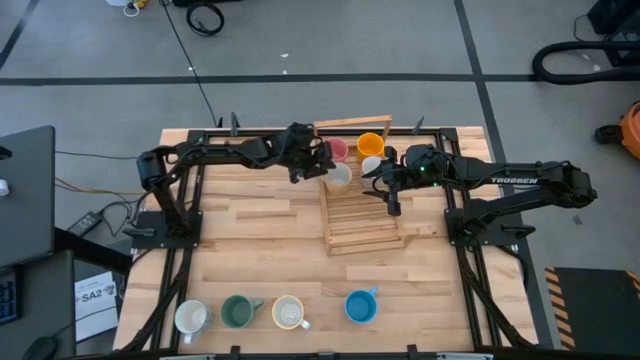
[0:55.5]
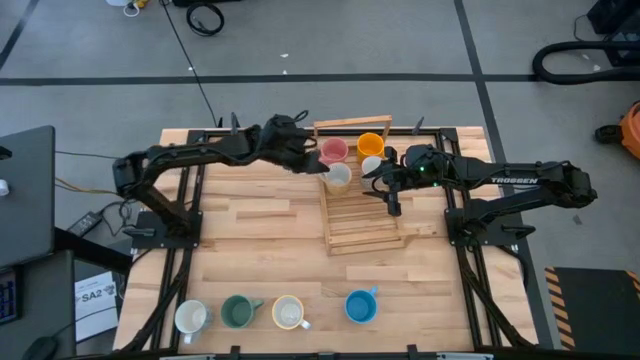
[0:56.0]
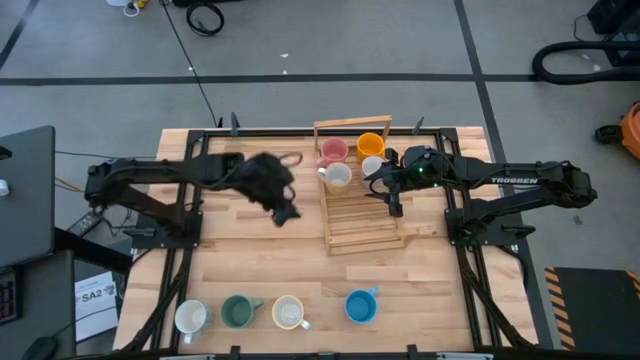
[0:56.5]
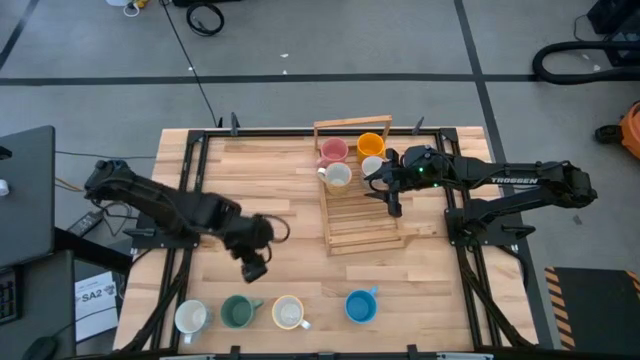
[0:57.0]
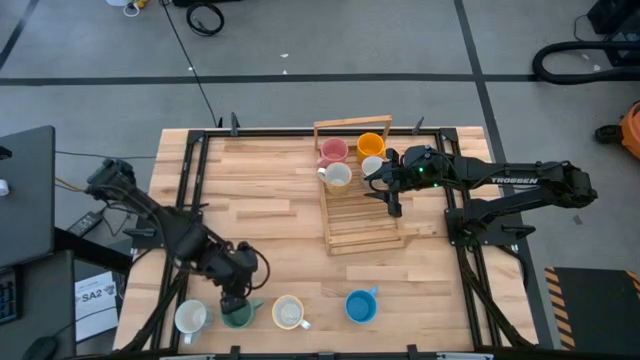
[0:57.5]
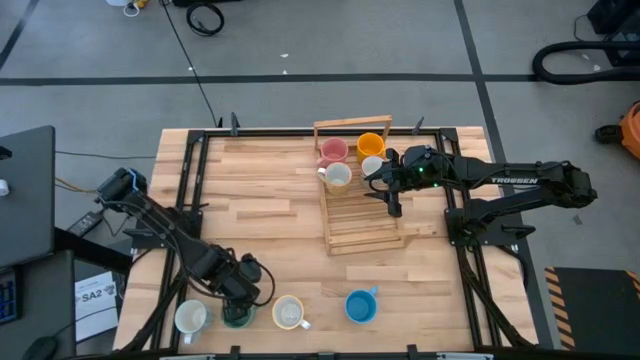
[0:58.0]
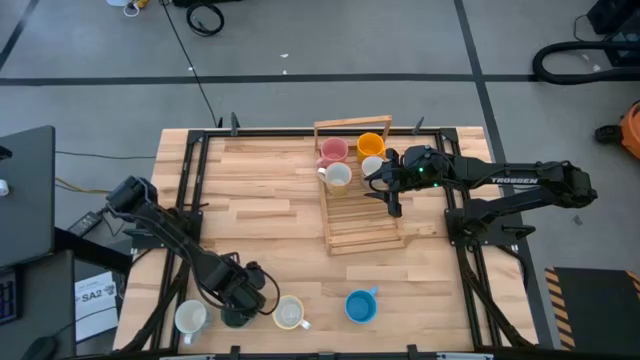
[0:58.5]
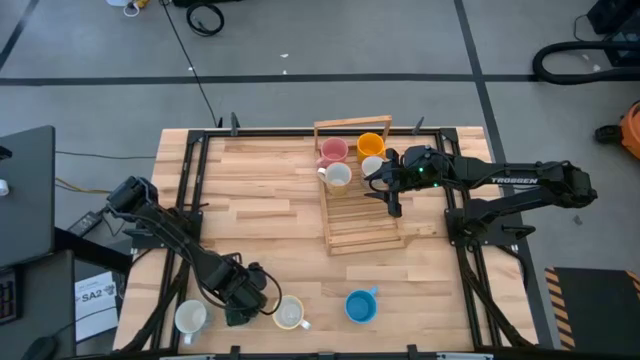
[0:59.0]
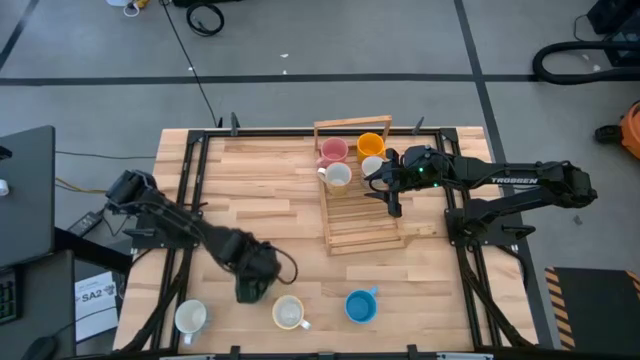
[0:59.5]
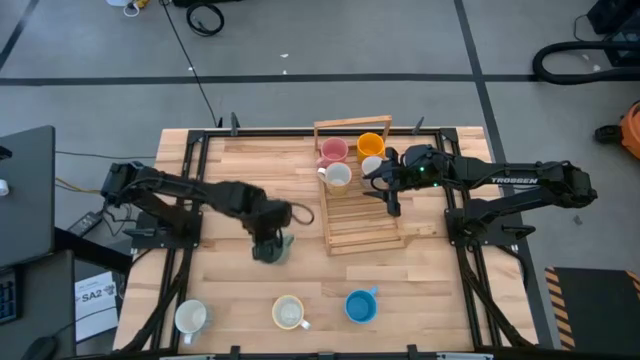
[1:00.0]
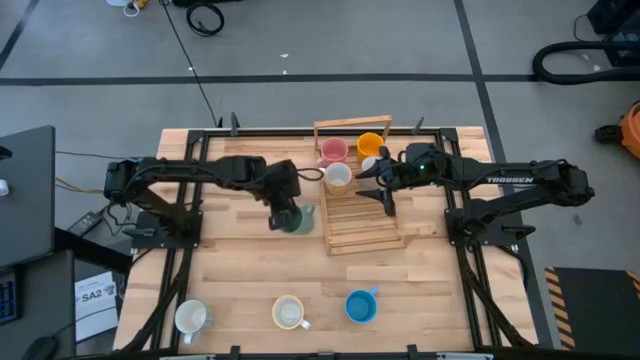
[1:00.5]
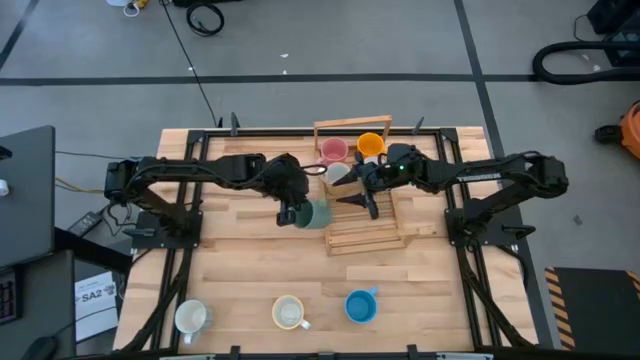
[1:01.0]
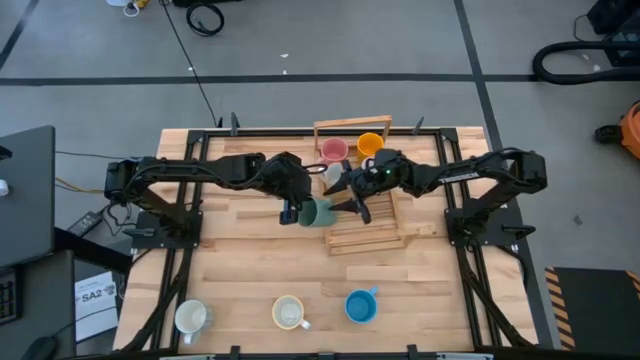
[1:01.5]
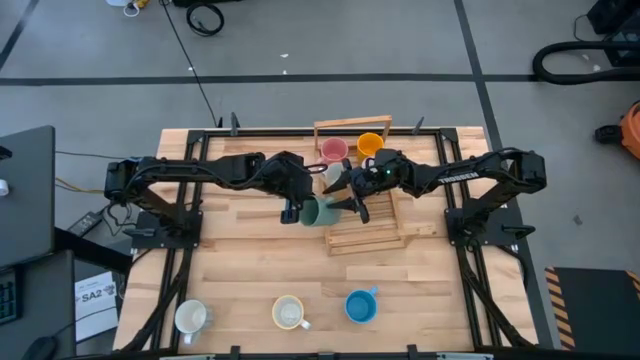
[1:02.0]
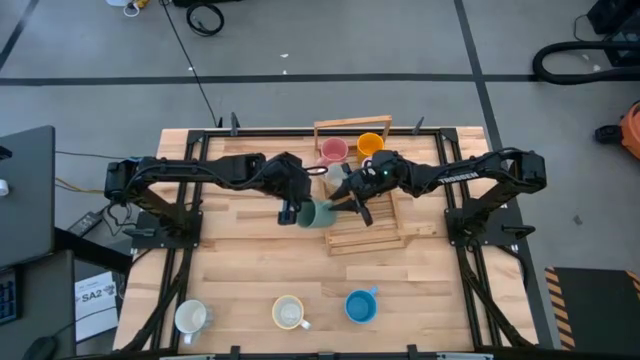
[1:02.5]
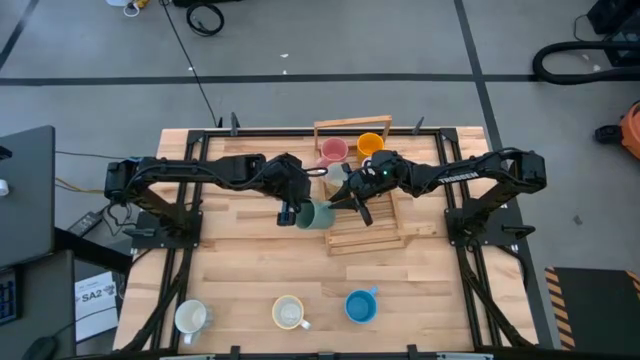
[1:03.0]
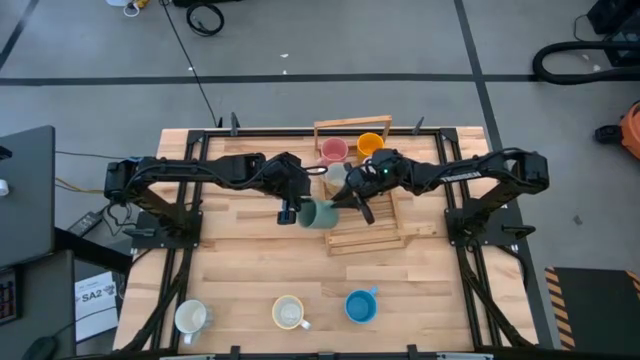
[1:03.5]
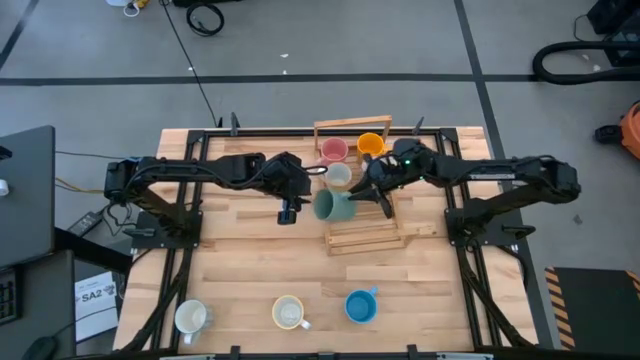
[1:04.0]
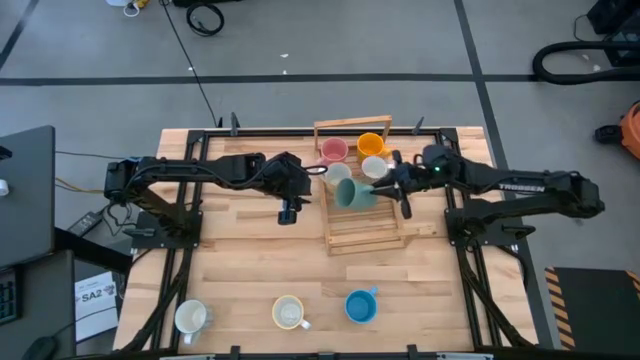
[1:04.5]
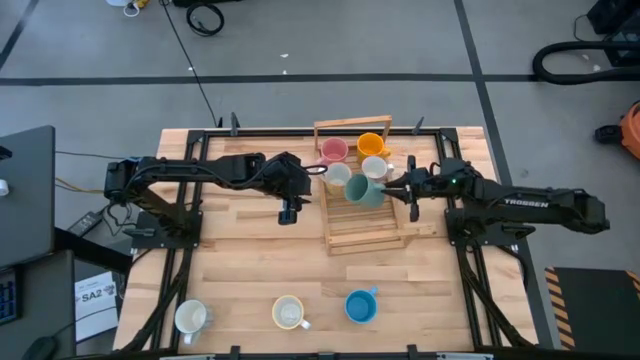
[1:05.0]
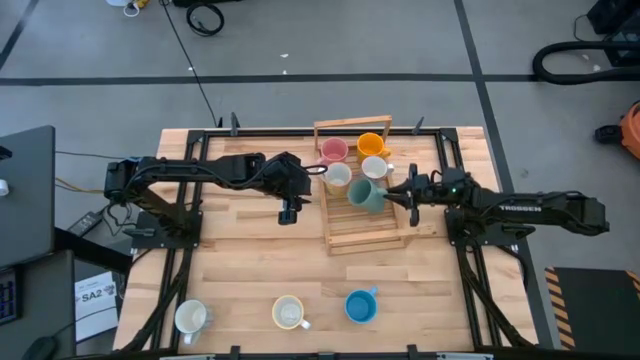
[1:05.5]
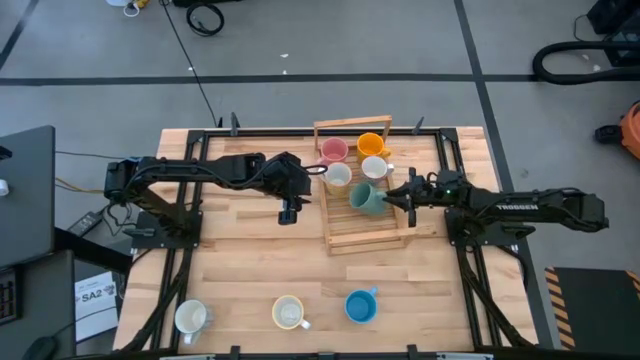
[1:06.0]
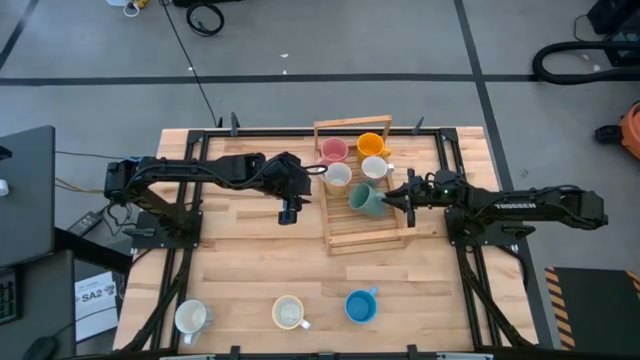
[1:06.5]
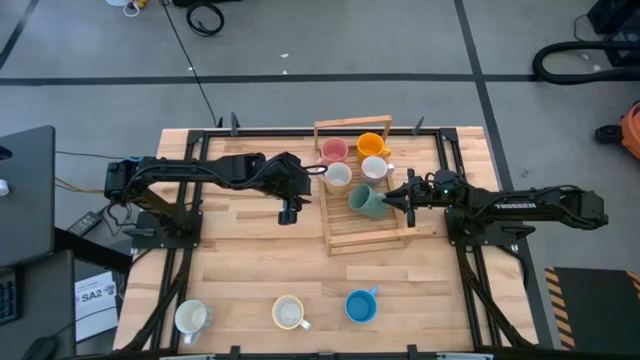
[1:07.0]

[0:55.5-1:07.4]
Task: Place coffee mugs
Put the green mug on the shelf

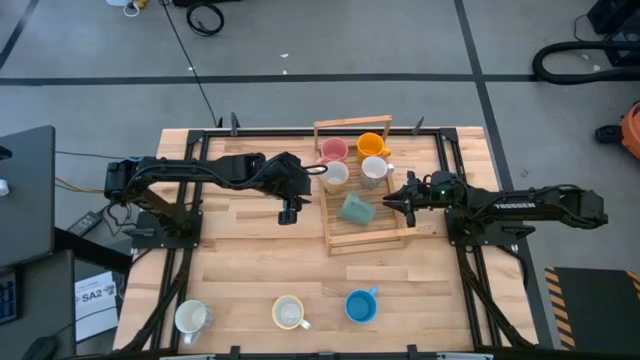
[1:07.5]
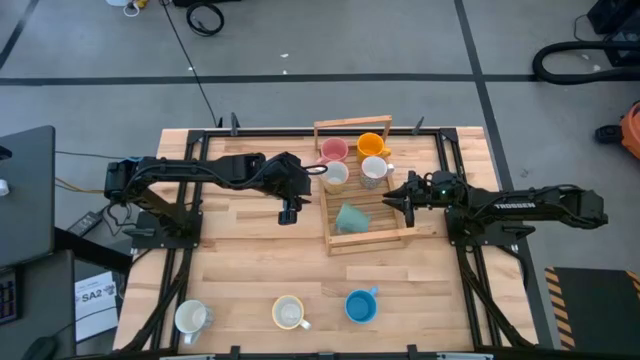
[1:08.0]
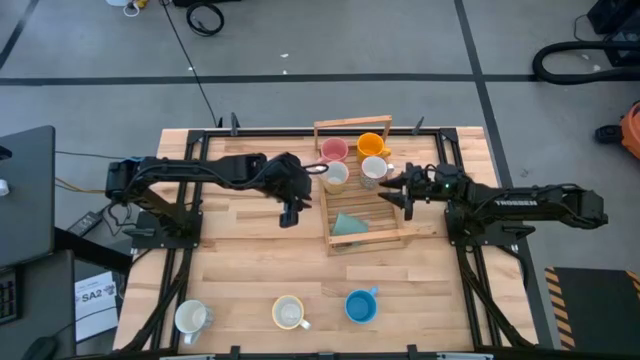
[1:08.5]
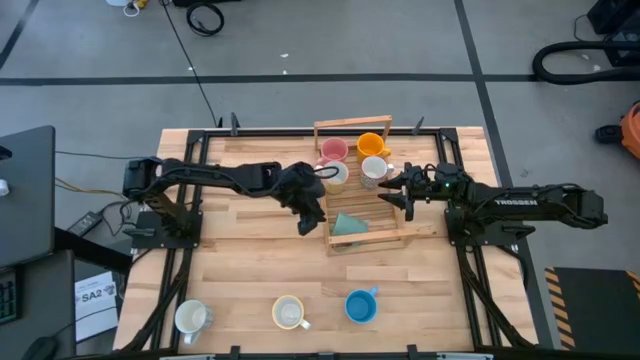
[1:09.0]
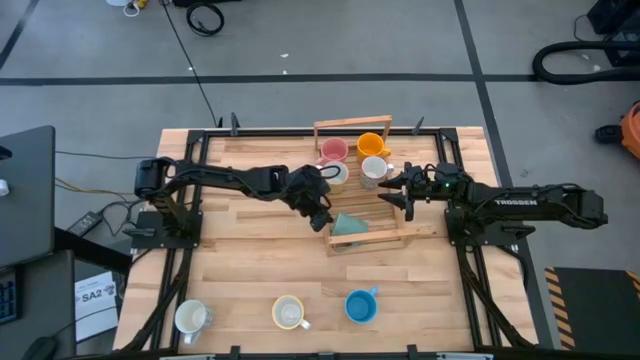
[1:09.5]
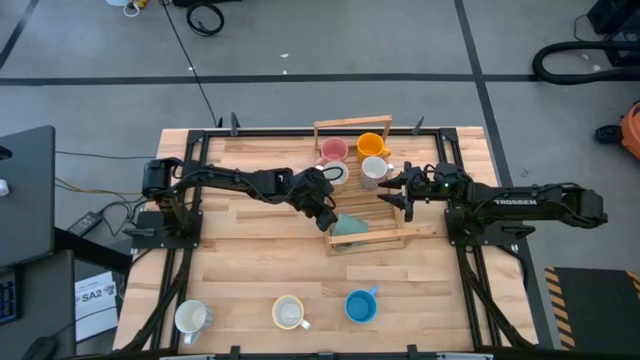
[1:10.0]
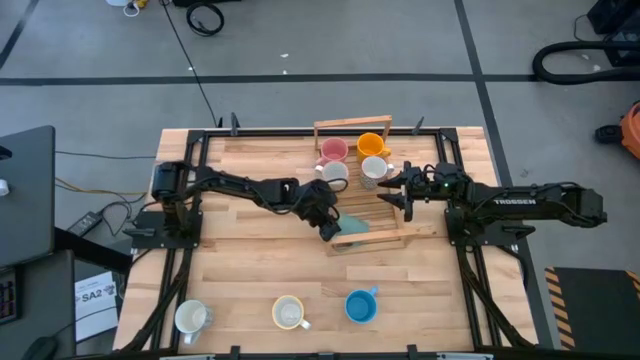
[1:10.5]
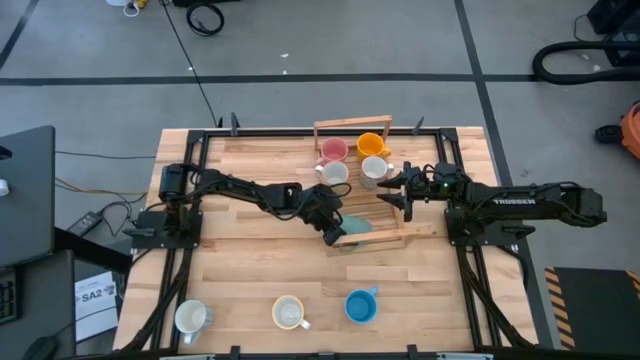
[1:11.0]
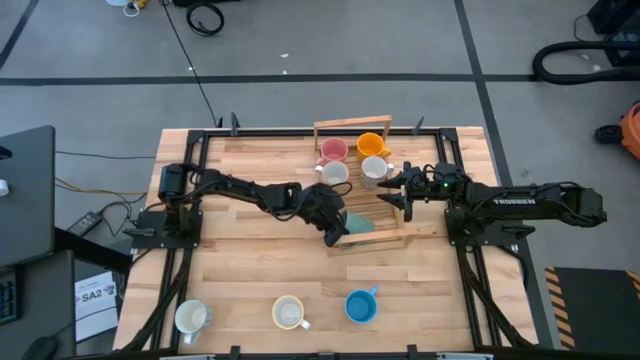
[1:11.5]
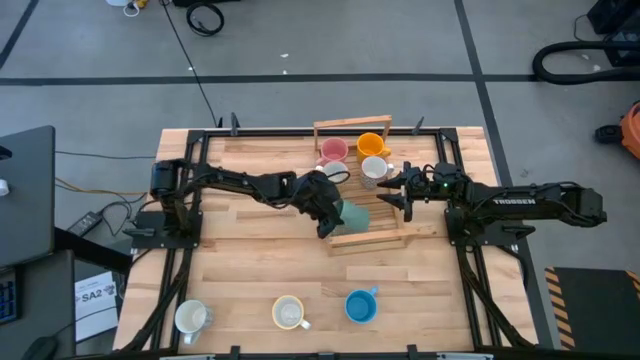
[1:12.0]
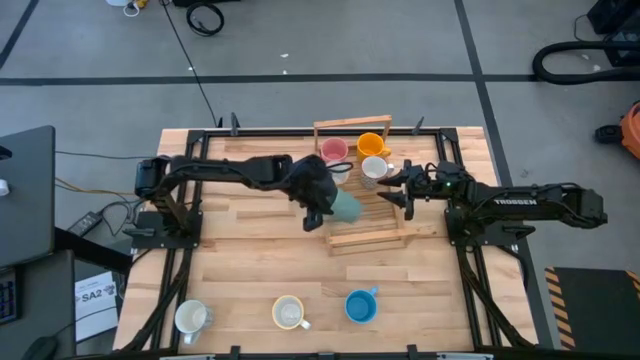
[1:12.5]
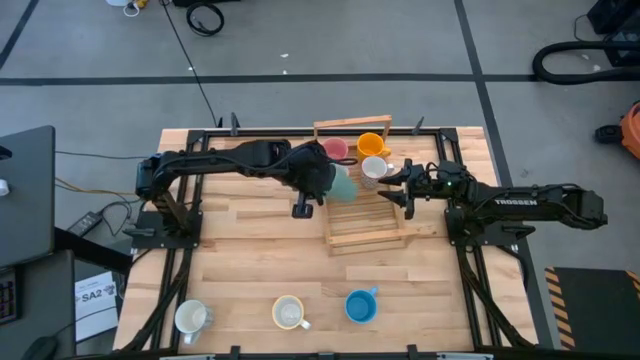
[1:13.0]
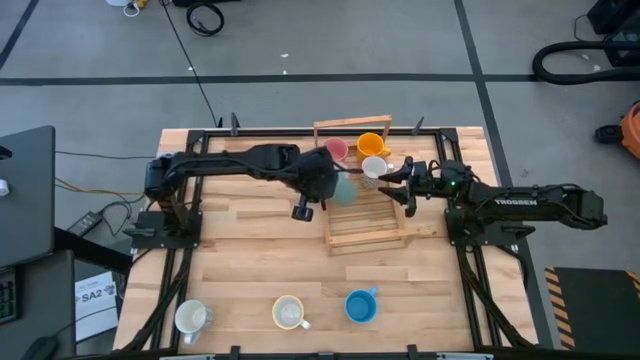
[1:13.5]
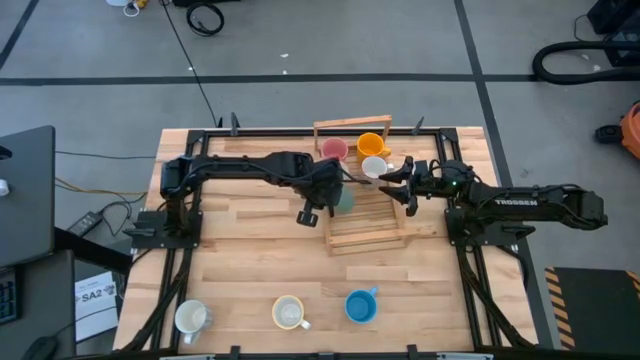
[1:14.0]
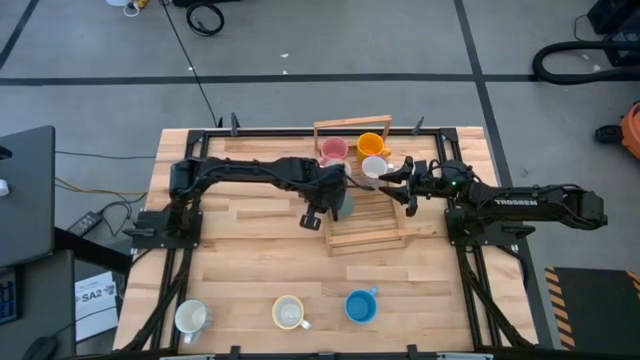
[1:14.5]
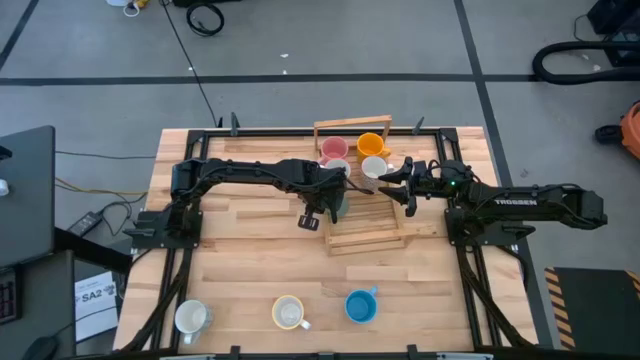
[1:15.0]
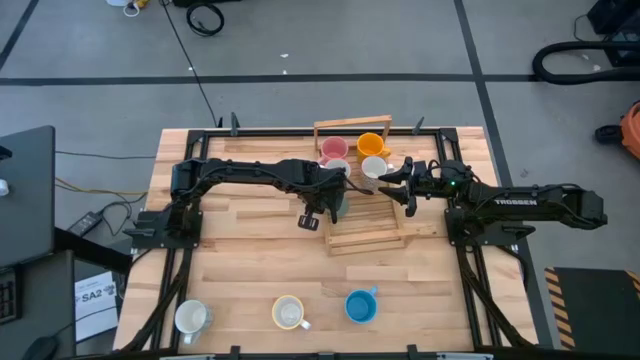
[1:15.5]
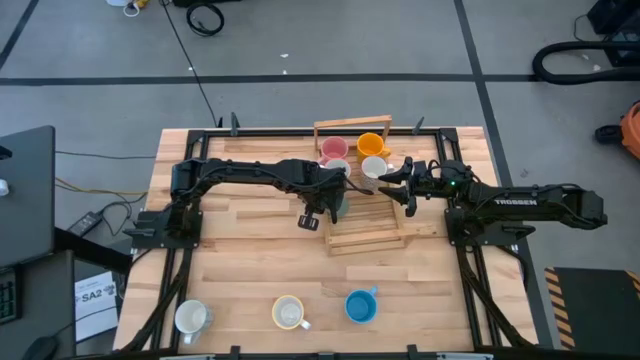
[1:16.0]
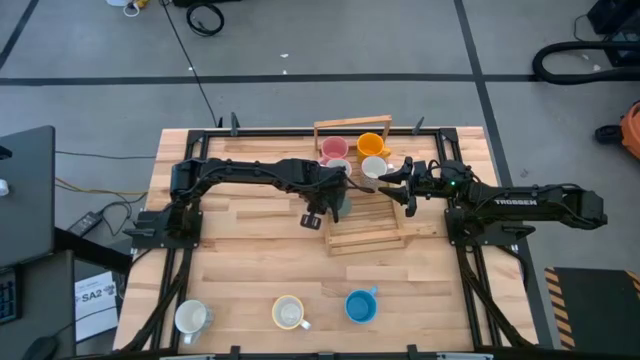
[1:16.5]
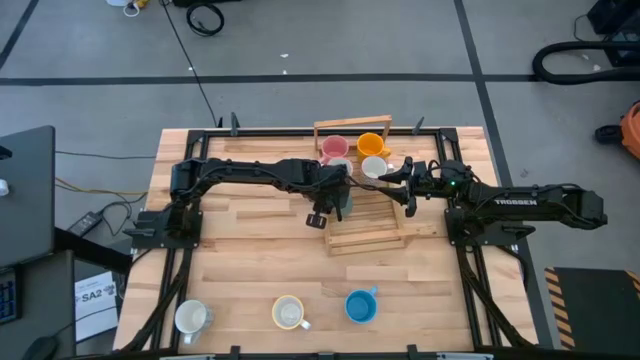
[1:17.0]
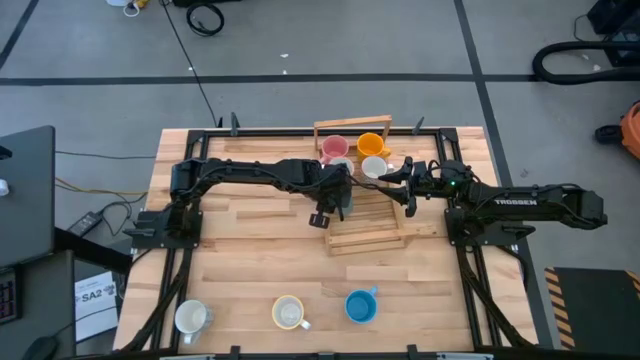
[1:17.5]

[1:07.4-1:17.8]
Put the green mug on the shelf
